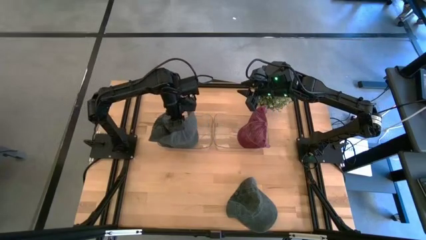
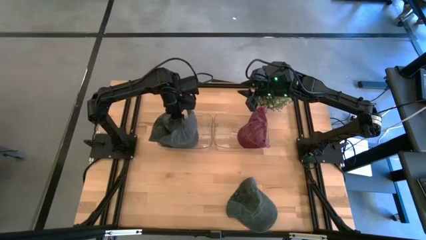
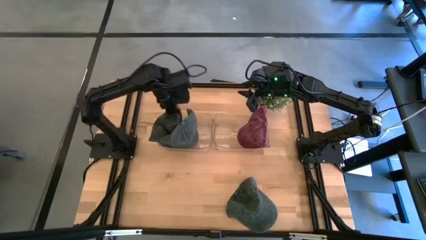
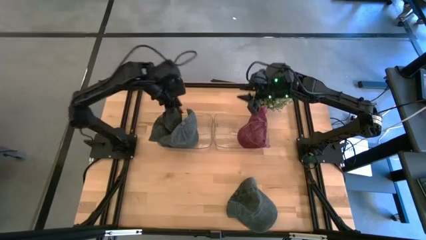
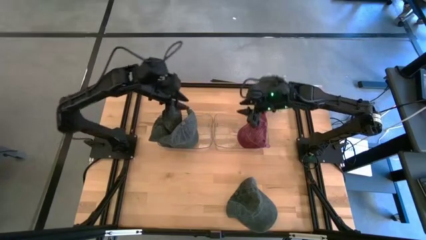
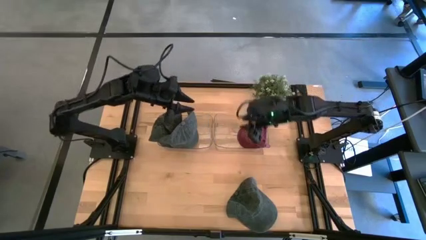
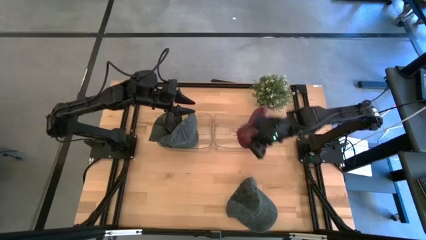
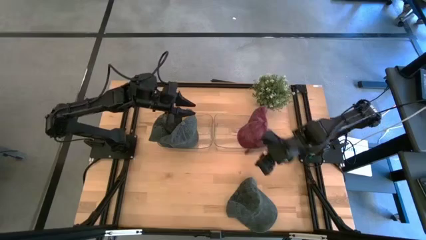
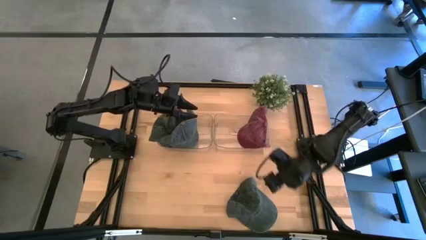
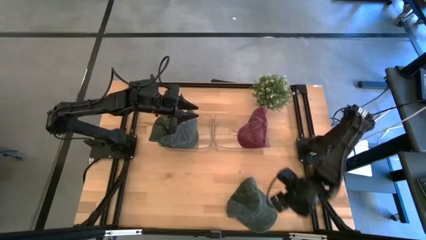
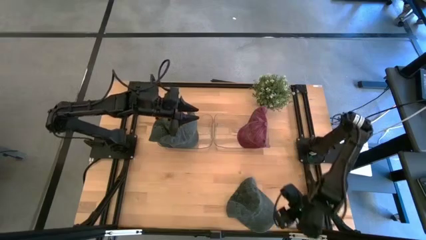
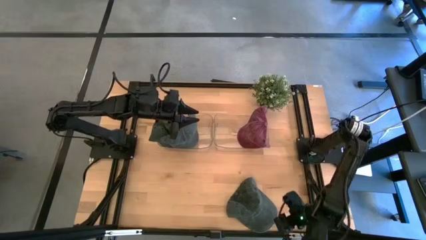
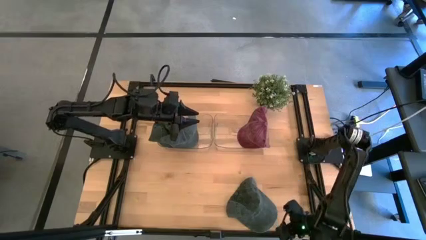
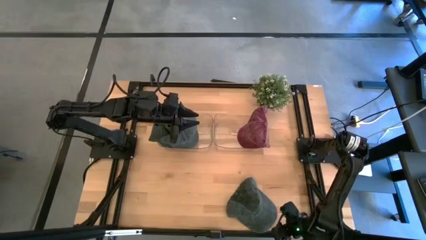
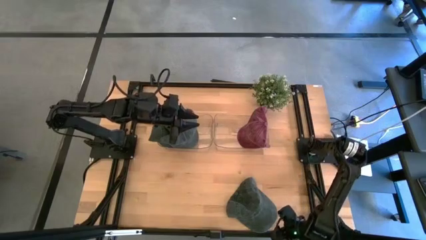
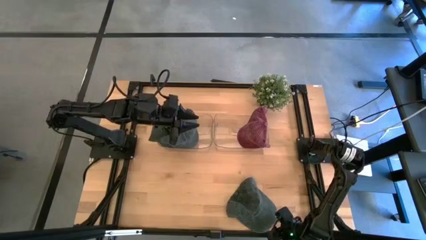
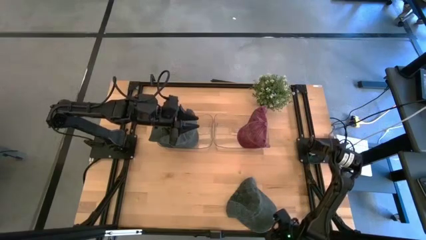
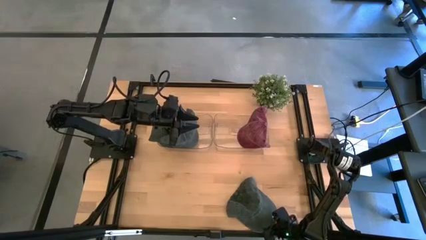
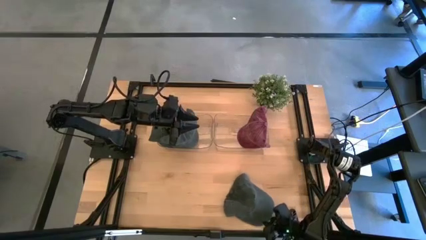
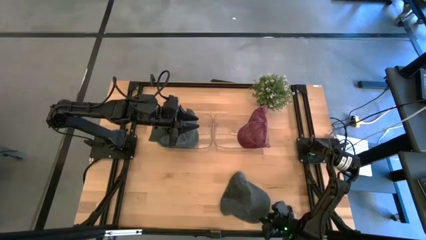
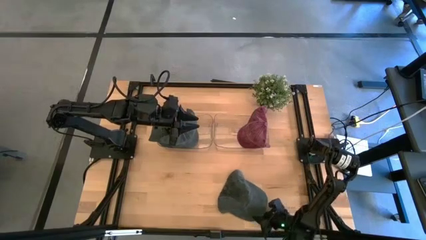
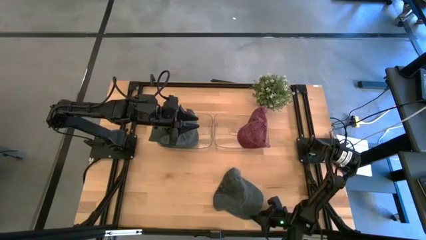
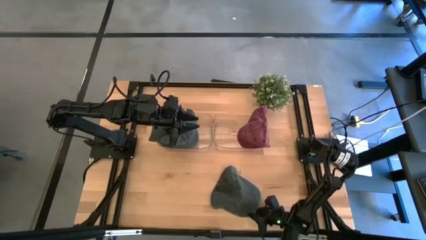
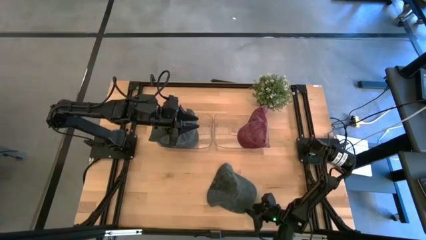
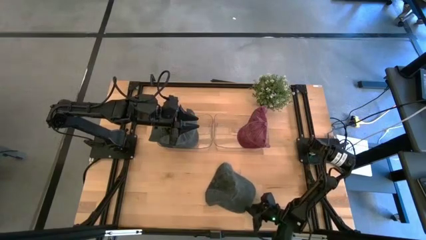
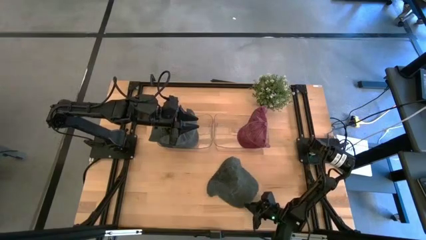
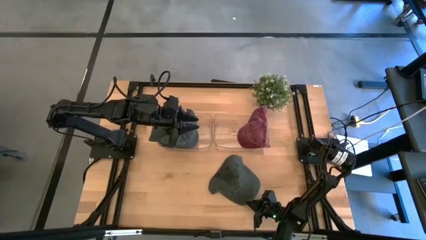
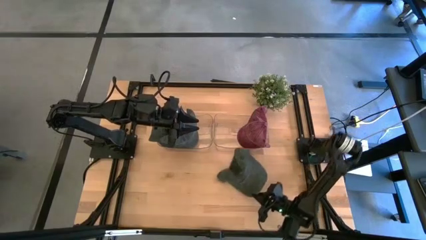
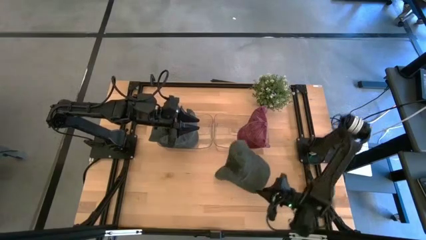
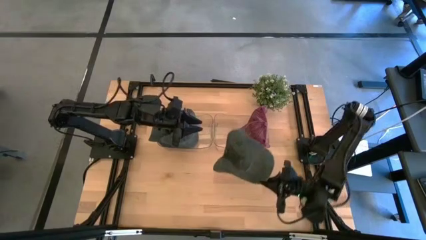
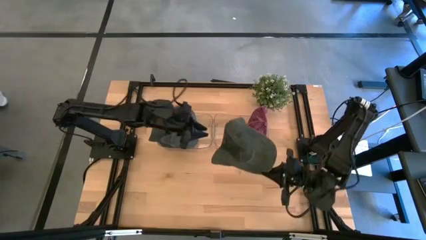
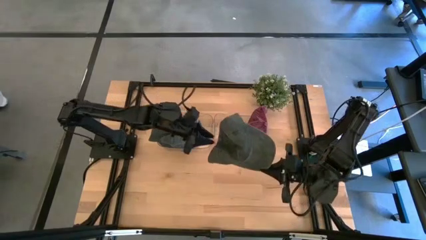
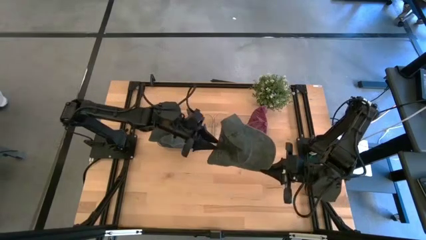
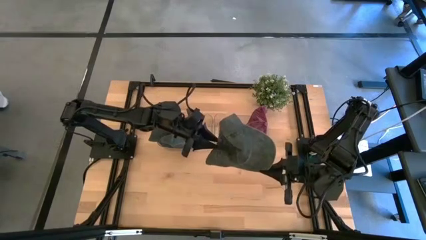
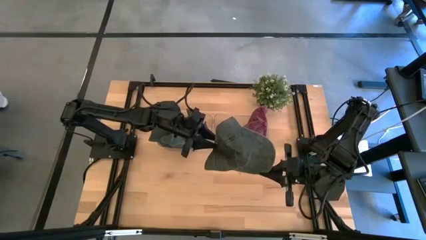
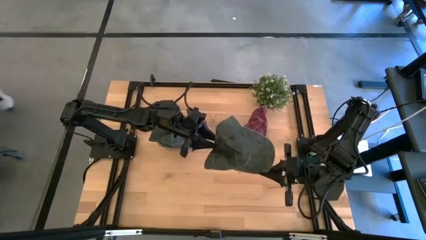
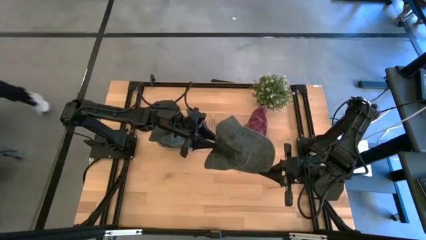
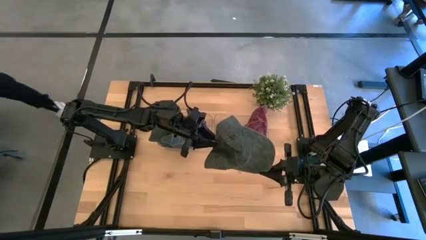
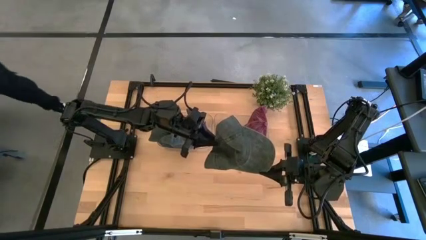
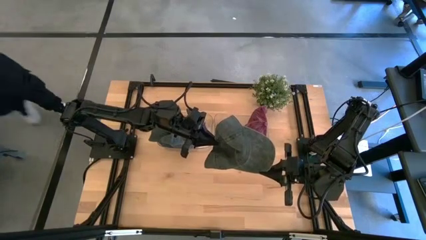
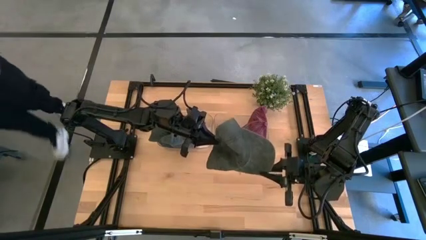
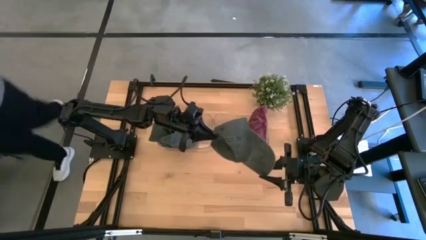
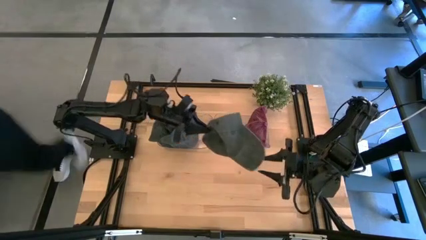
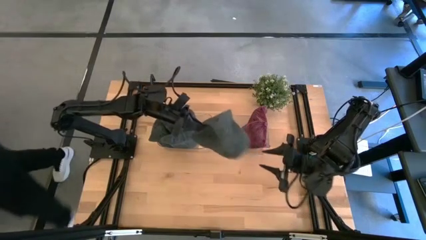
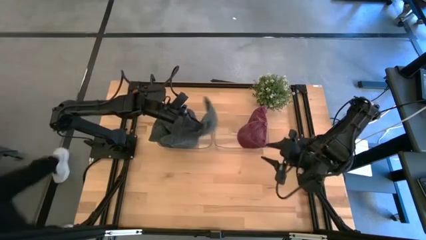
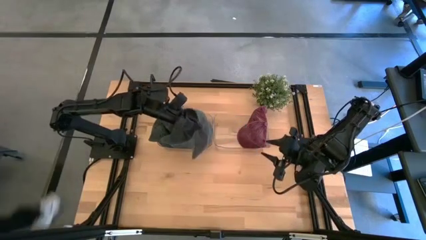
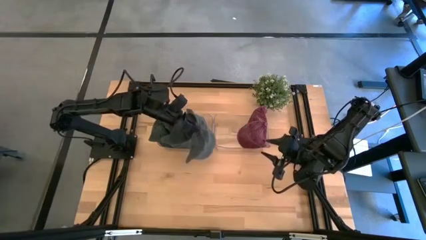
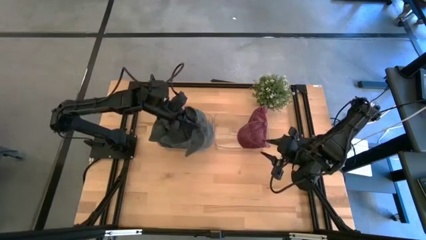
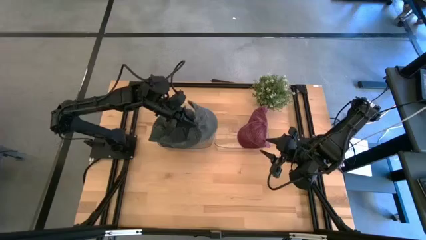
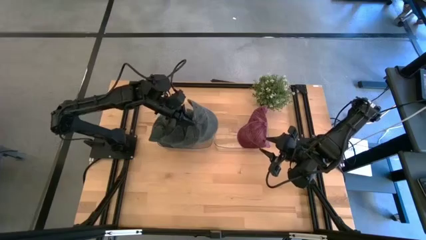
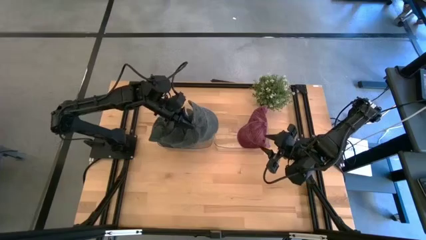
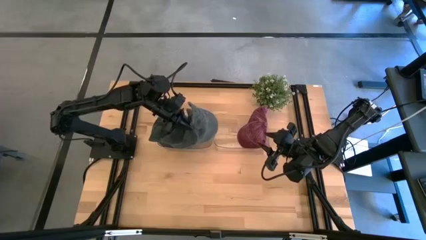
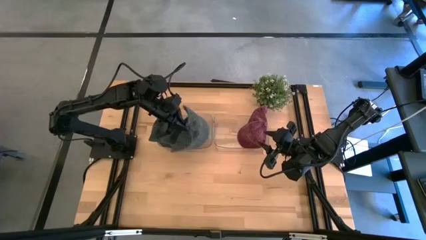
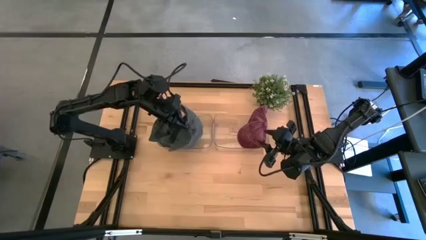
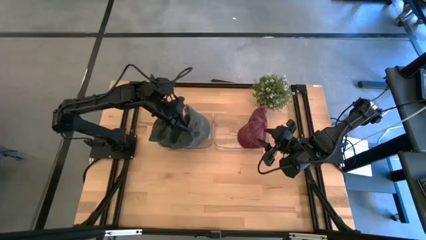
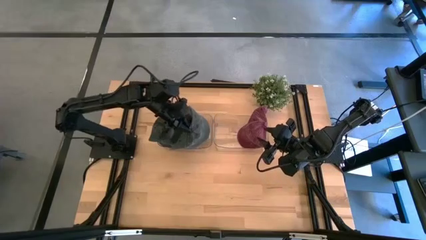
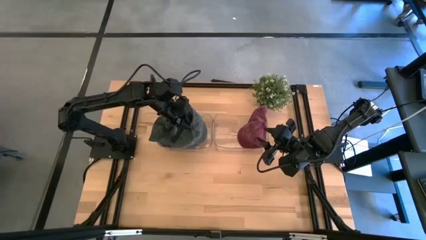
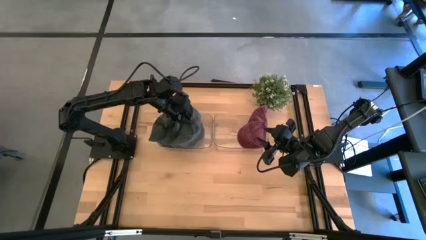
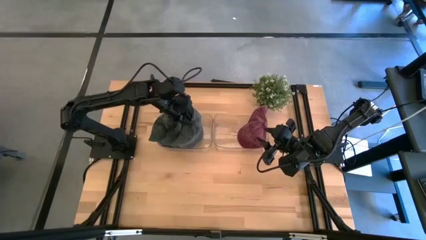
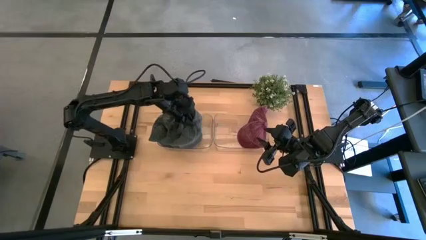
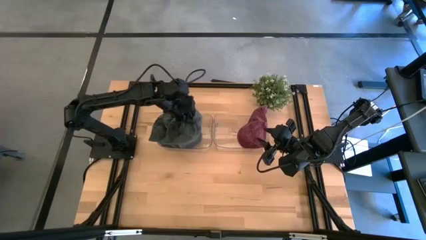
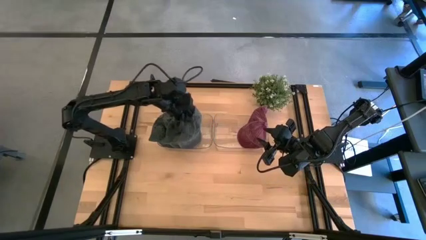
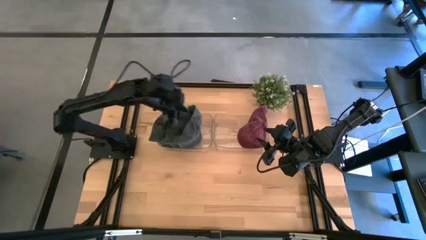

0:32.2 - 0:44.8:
Task: Pick & Place hat
Put the black cap into the left transparent bin

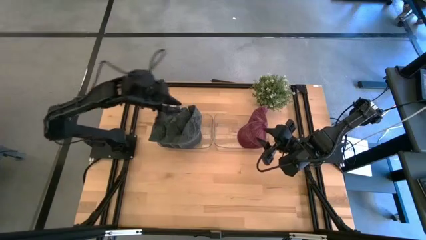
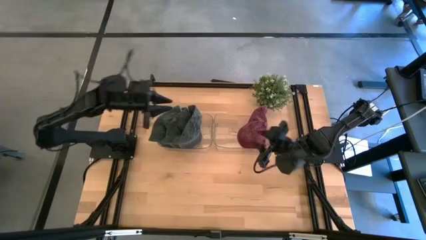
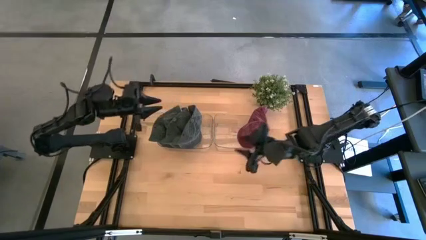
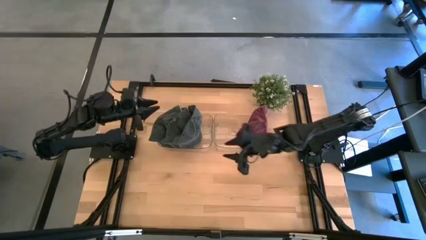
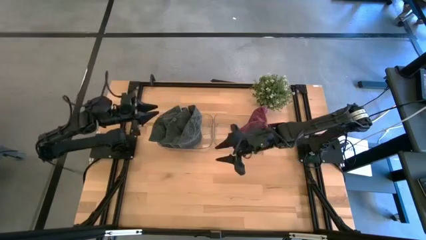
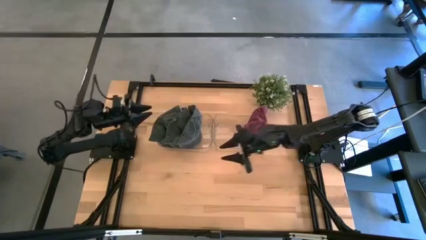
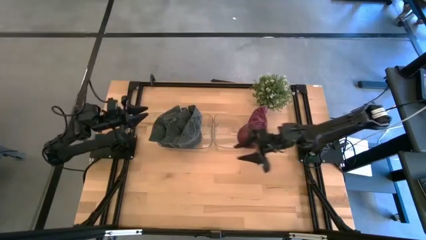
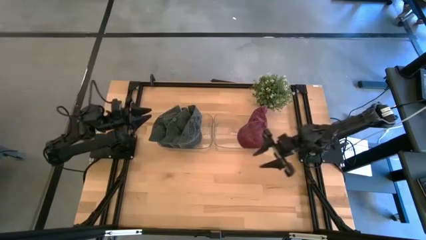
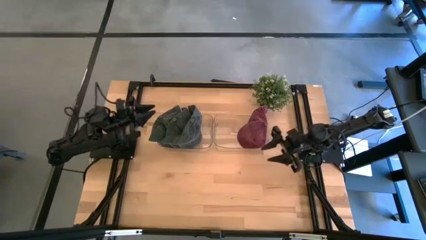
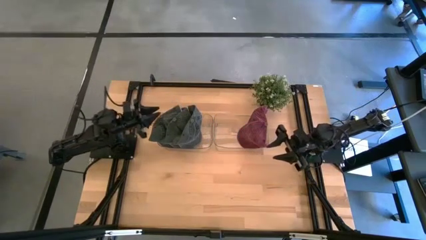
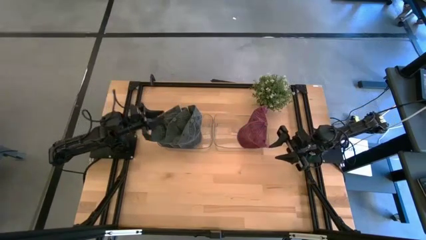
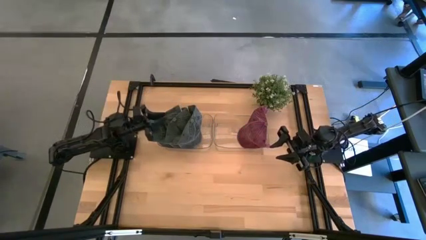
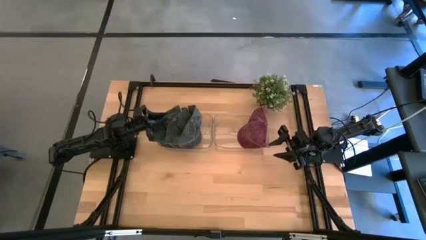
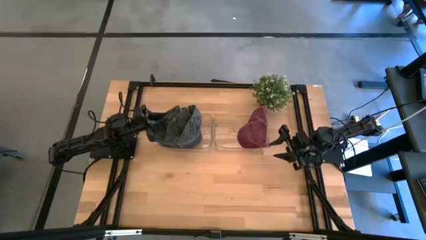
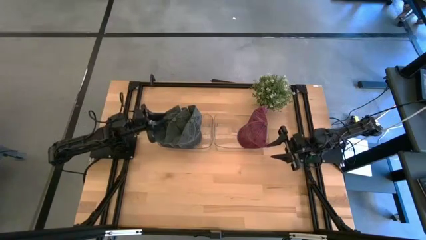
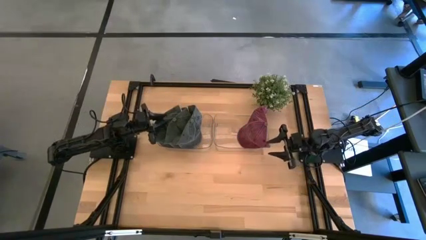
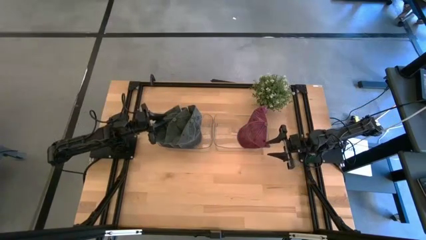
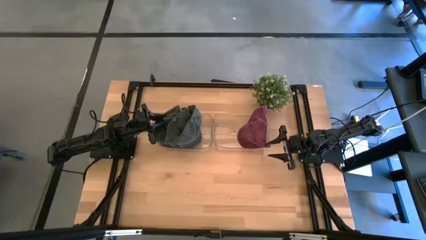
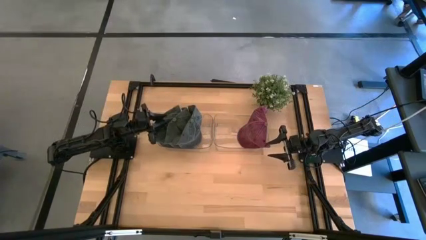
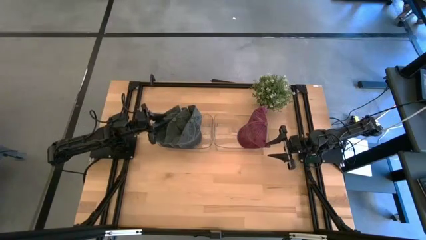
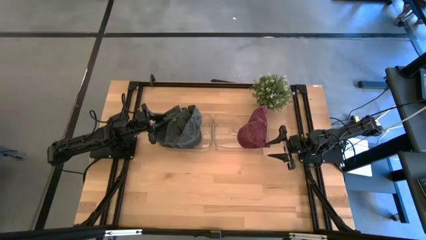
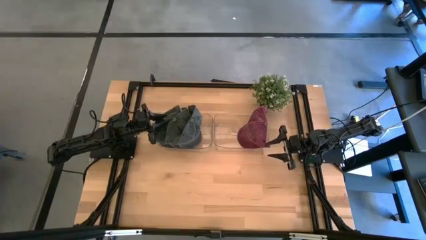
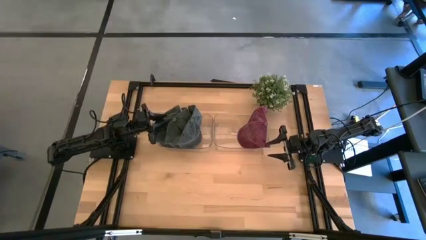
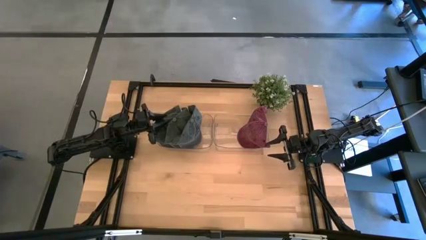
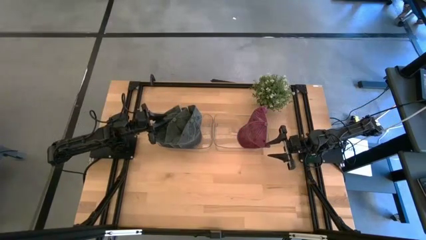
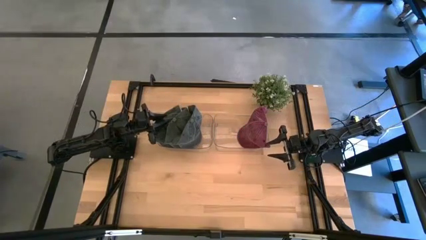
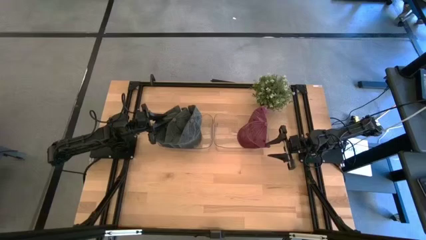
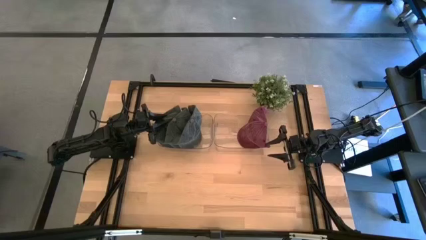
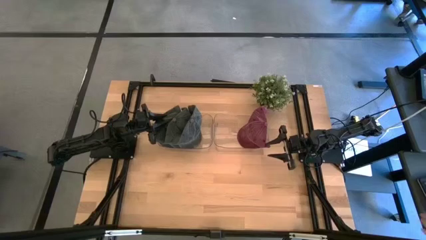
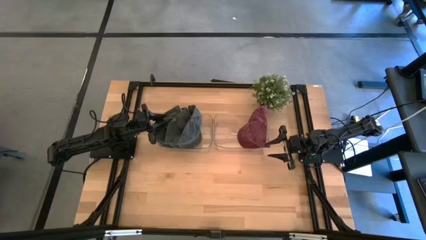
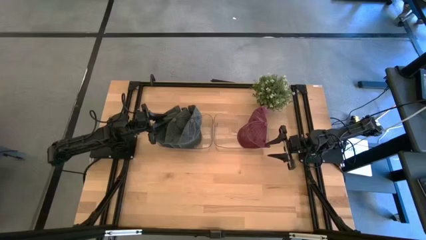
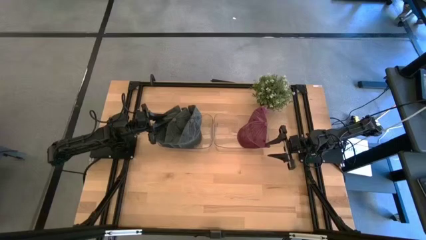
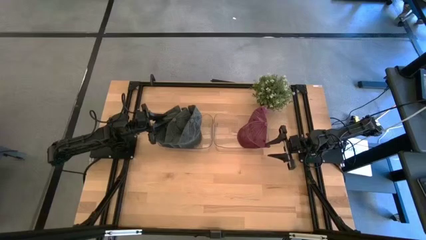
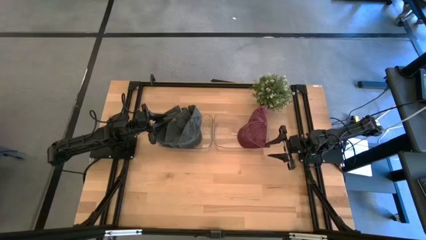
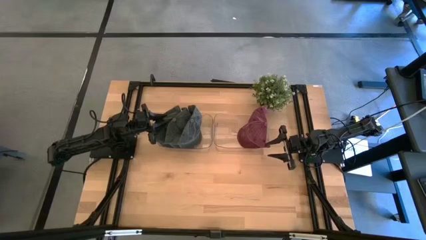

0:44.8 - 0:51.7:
Return to Home Position
